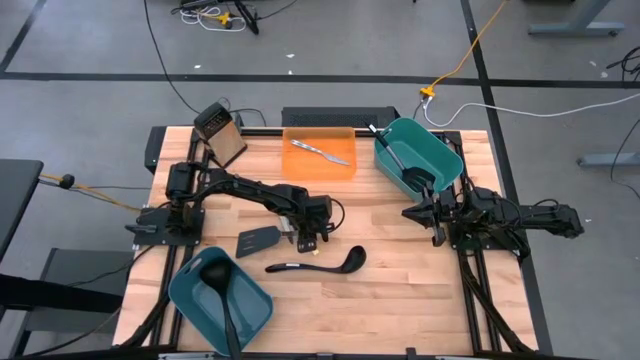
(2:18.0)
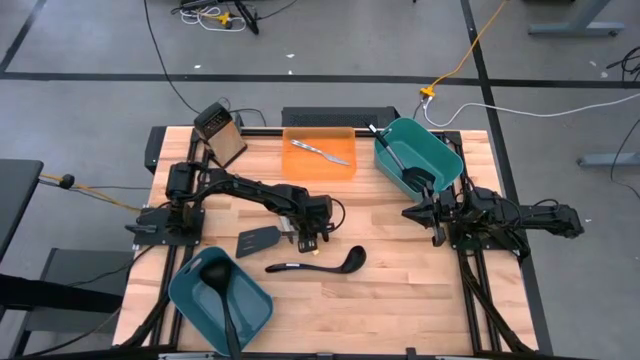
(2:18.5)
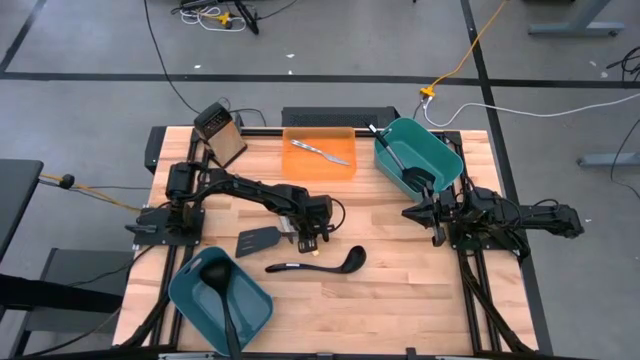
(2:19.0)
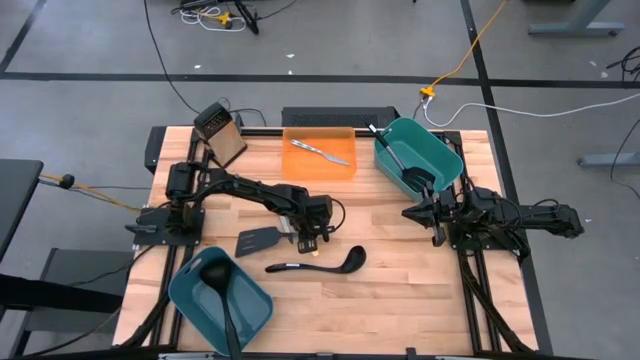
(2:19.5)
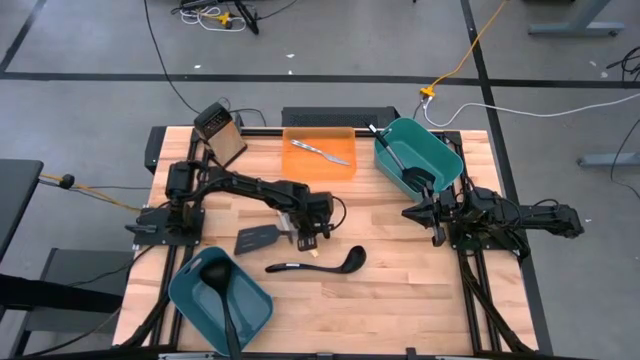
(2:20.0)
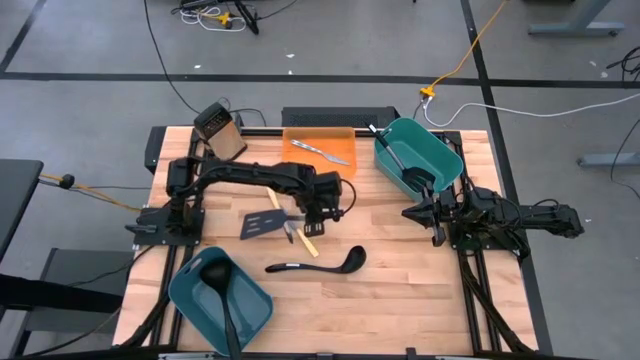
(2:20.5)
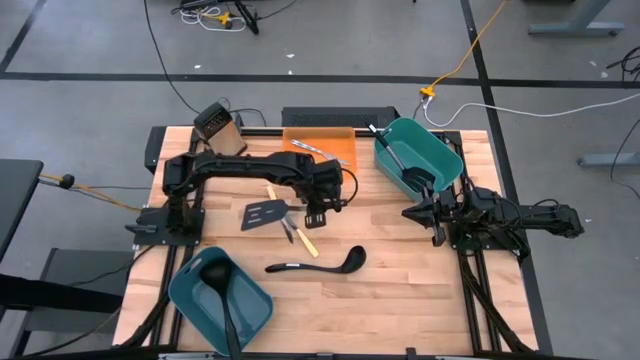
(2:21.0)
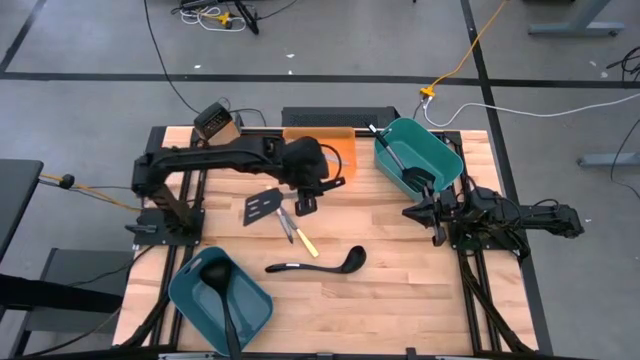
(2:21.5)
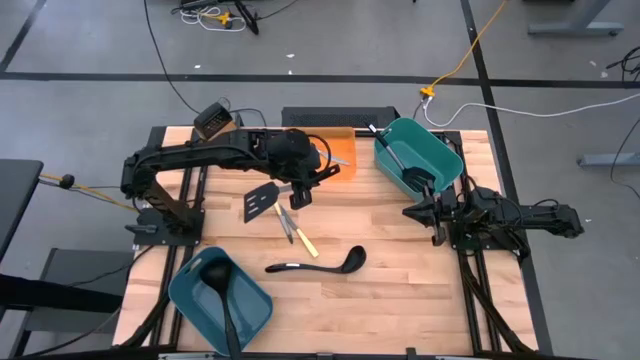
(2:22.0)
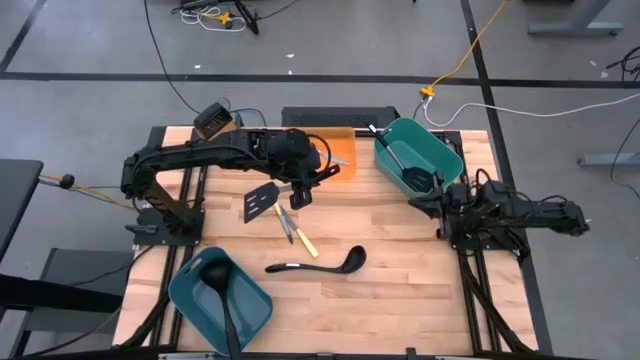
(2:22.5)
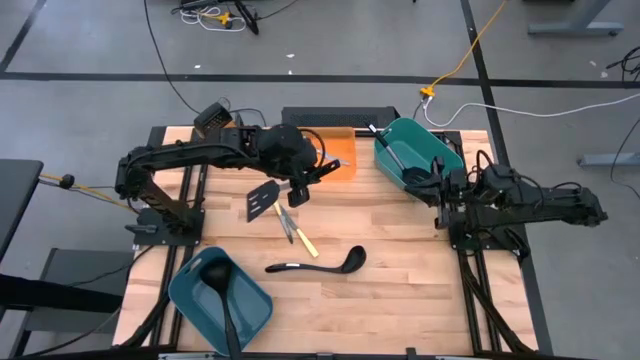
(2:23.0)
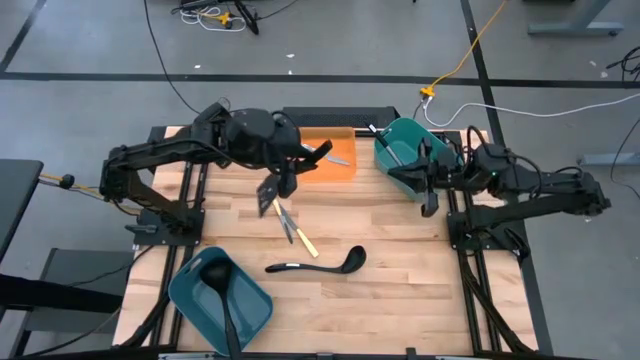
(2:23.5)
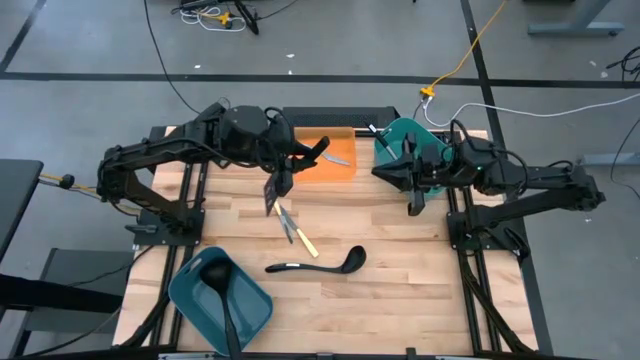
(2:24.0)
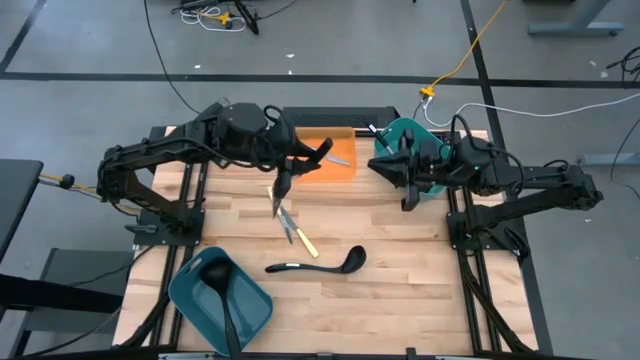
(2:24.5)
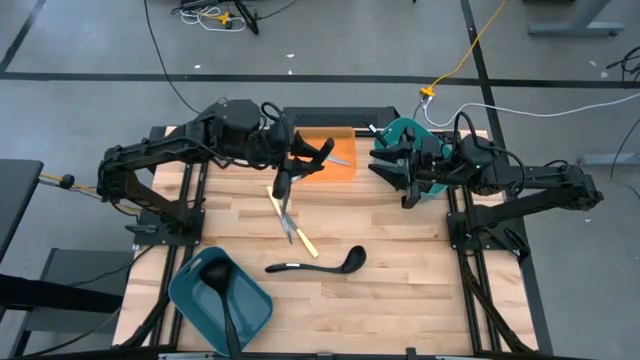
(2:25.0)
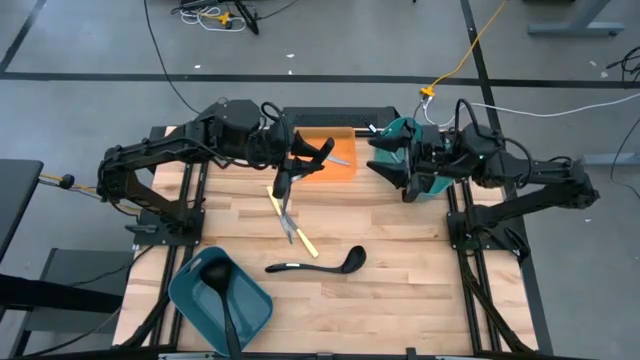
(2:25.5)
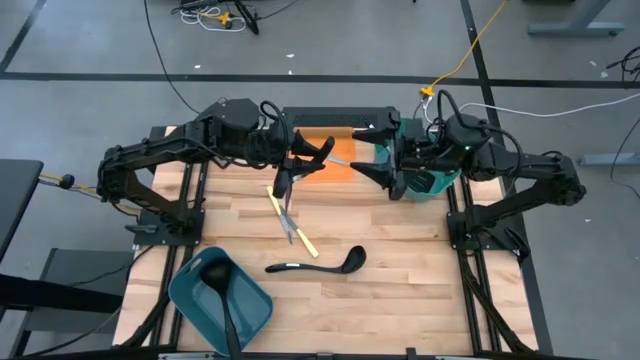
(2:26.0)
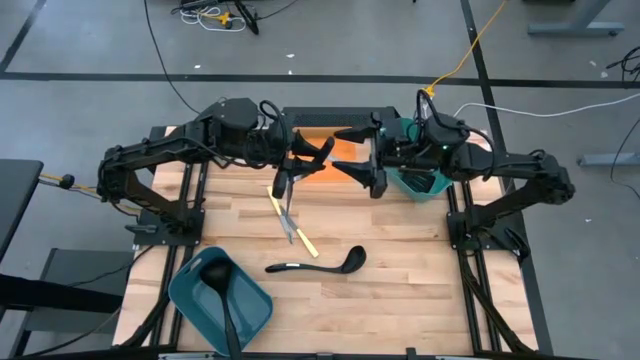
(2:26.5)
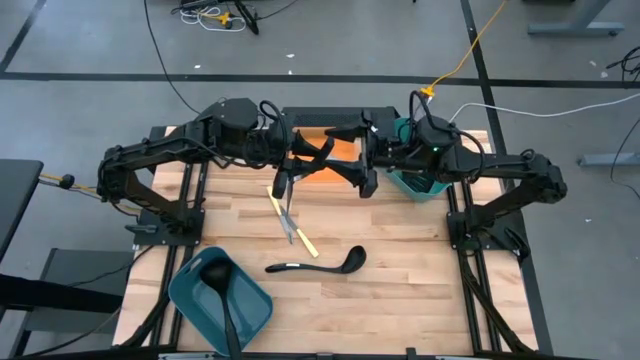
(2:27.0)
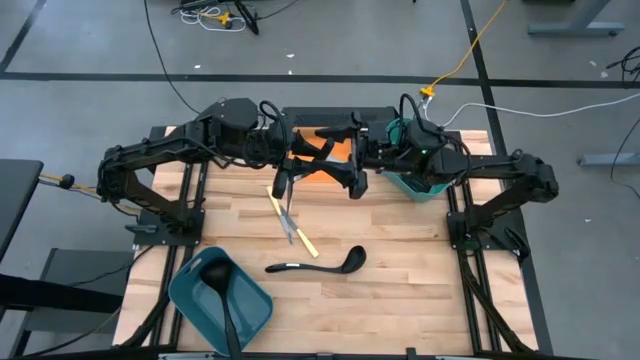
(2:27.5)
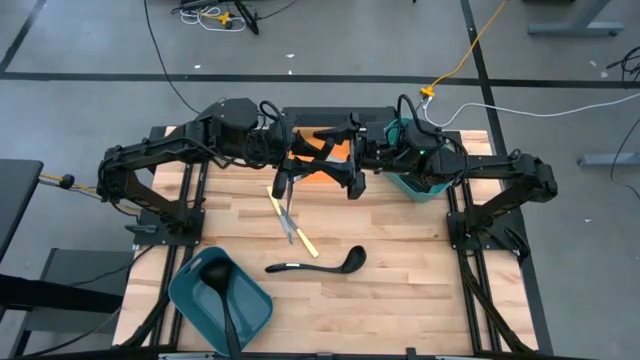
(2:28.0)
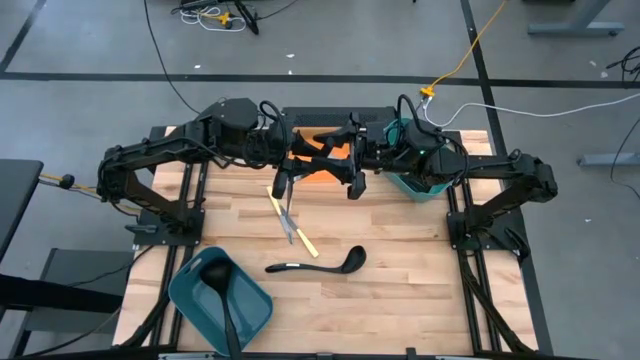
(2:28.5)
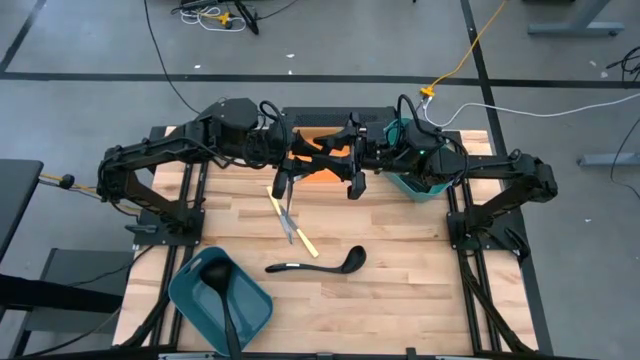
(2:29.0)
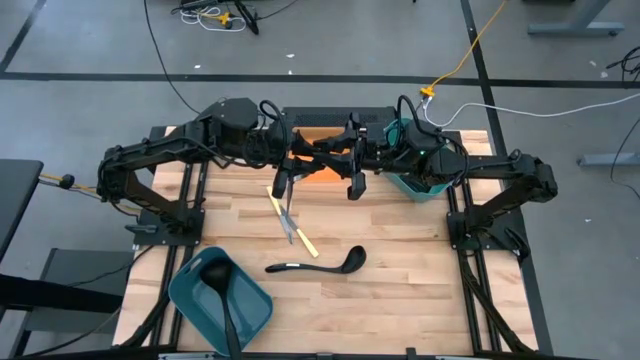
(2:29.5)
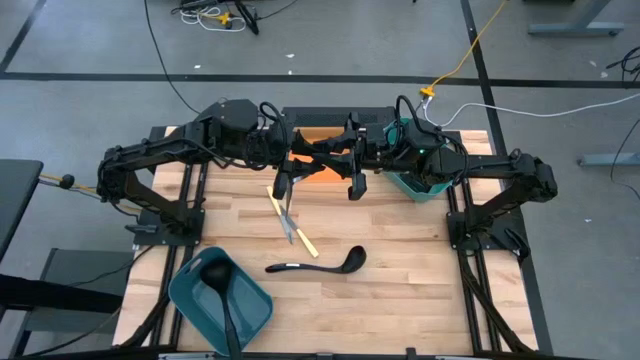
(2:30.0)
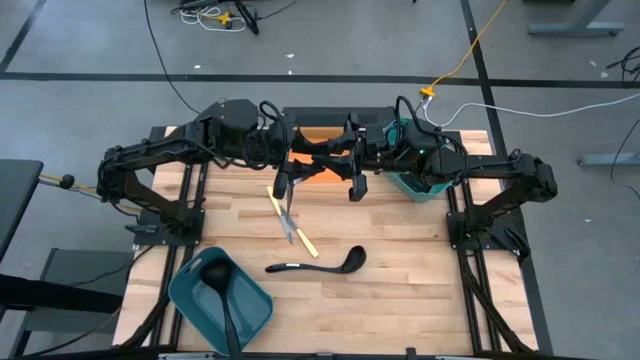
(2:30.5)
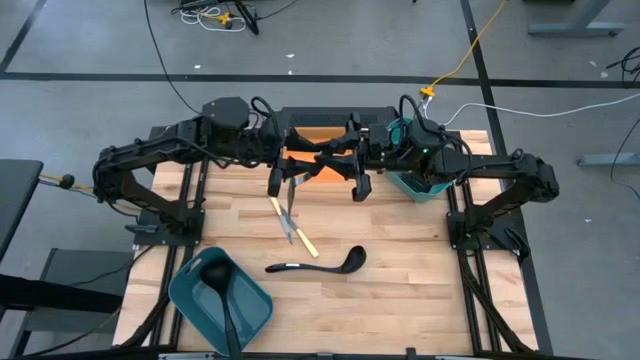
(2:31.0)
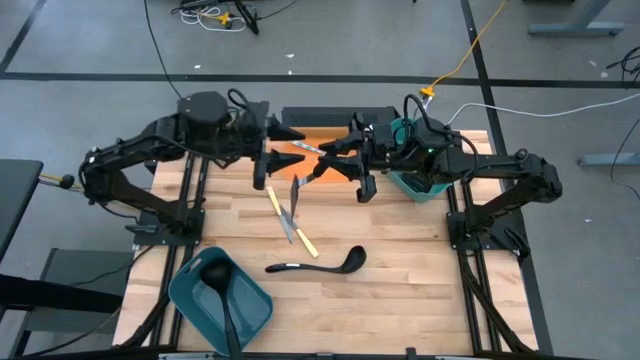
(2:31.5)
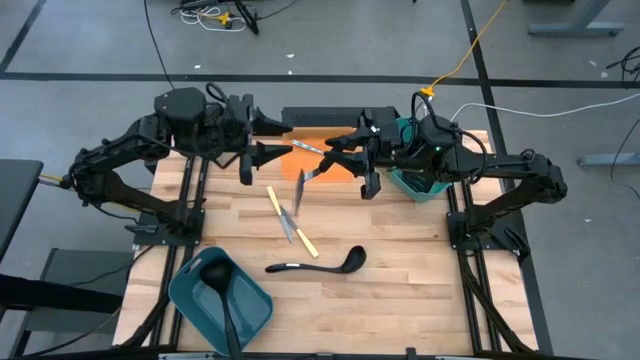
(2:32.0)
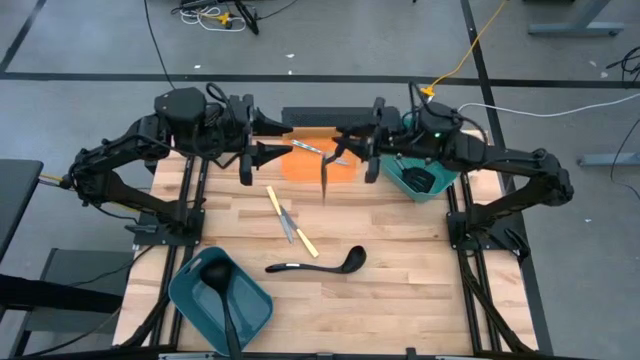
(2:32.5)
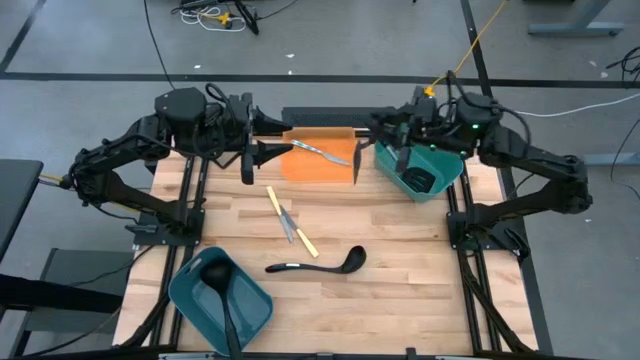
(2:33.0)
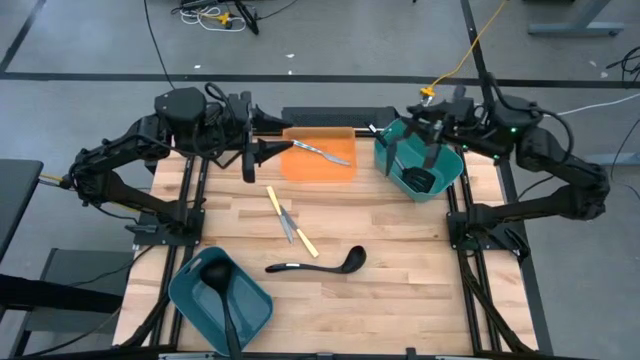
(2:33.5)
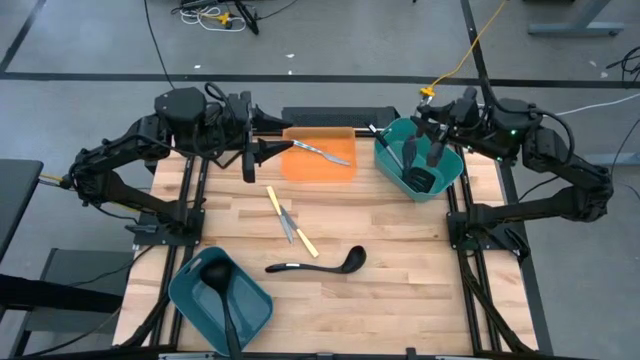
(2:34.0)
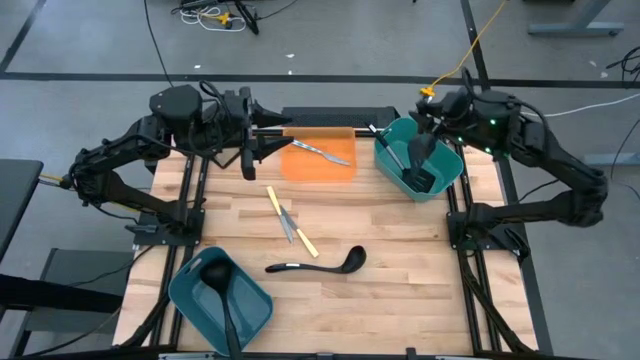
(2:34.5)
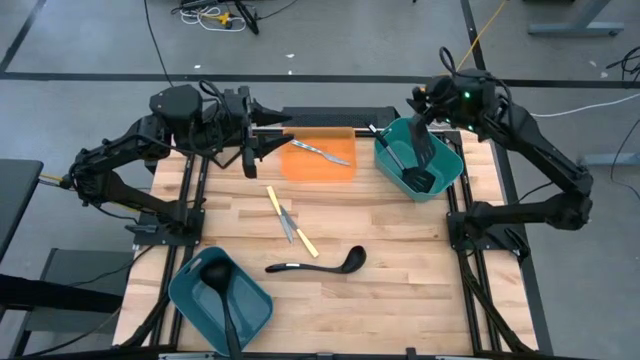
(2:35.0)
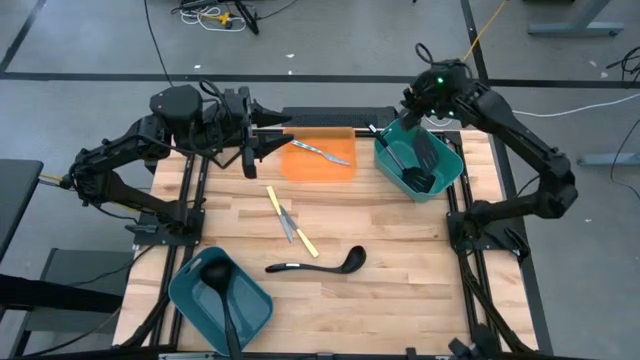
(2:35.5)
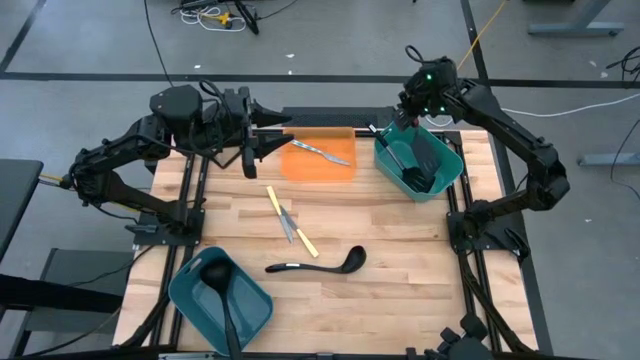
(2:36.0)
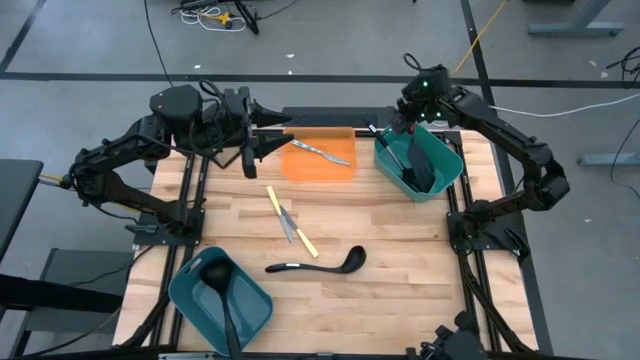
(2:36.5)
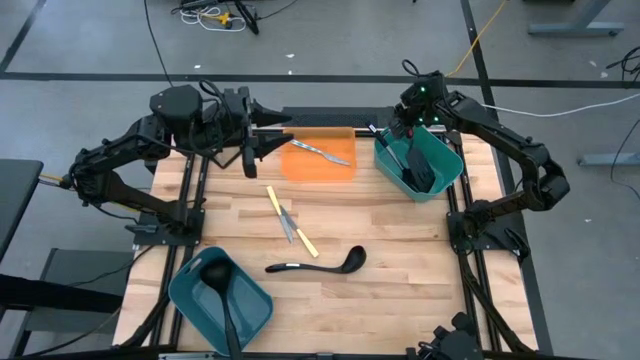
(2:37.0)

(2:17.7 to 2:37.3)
Task: Pick & Place Kitchen Items
Put the black spatula into the green bin

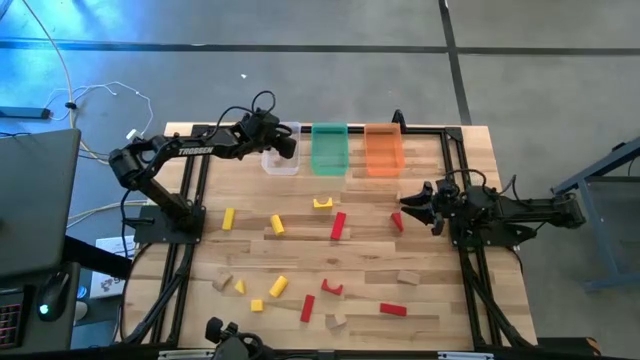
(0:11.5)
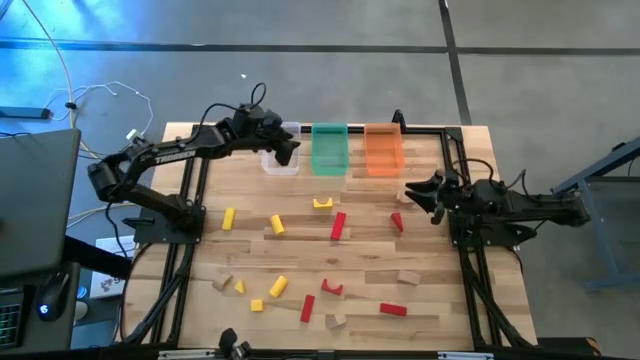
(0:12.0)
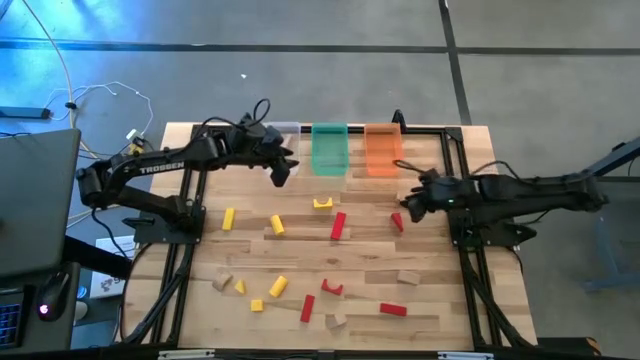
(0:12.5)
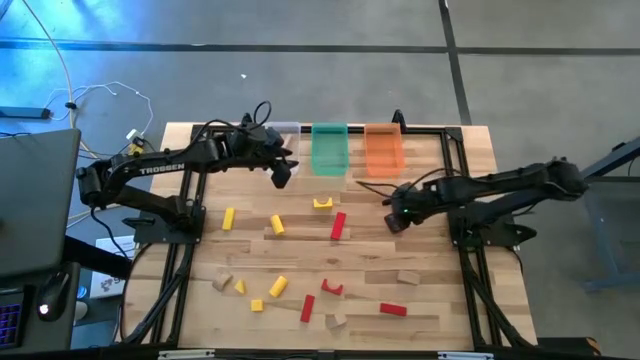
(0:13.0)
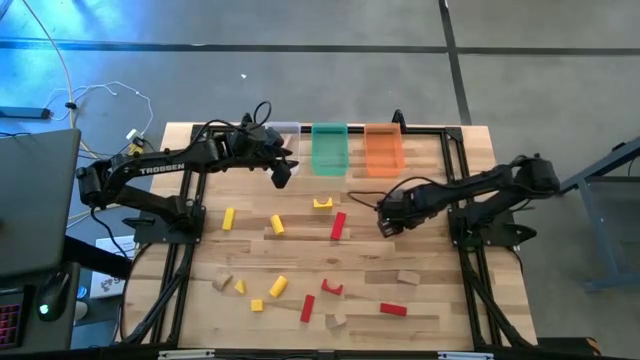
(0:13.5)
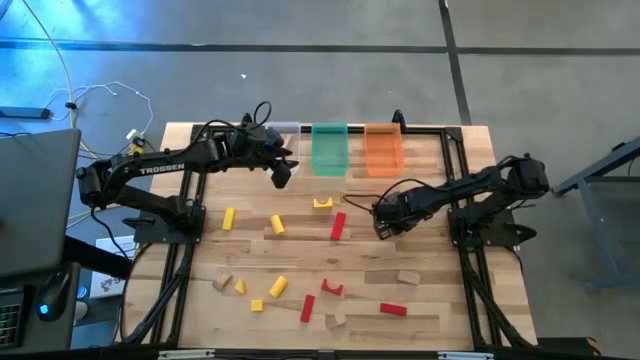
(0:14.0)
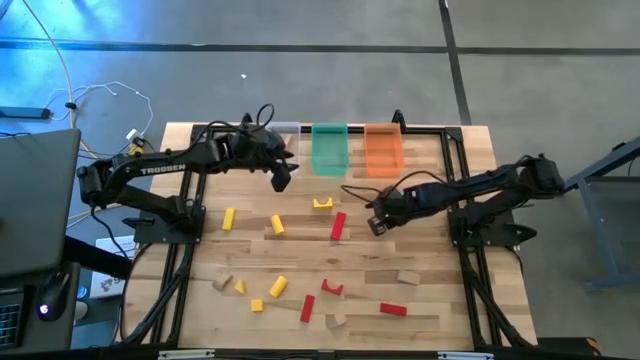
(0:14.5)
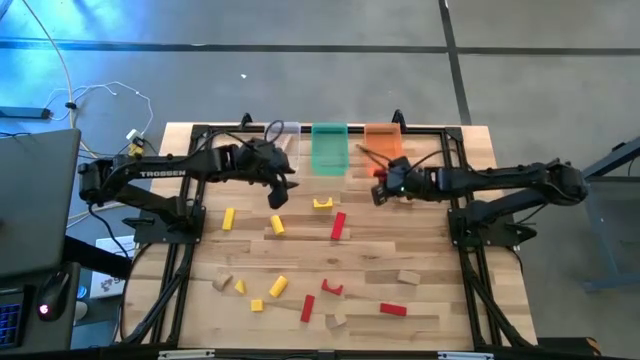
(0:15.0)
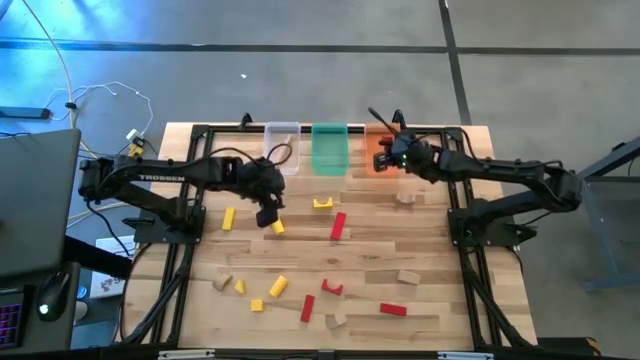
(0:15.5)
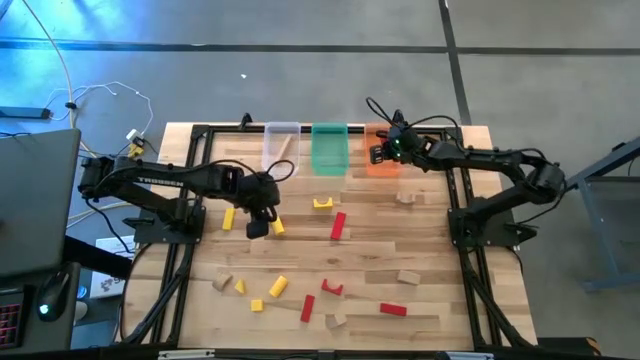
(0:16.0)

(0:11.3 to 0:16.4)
Task: Sort & place blocks by color
Put the red block into the orange transparent bin
